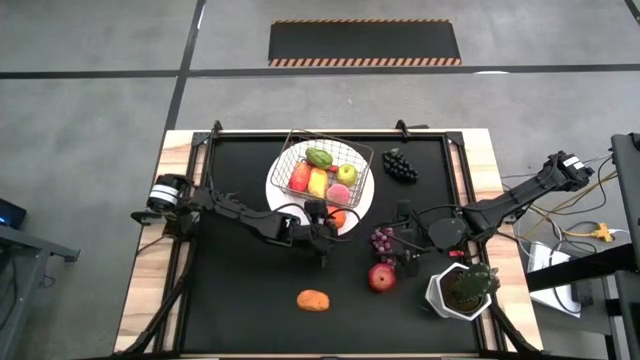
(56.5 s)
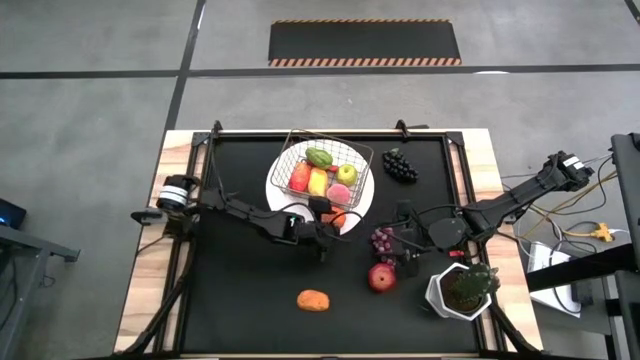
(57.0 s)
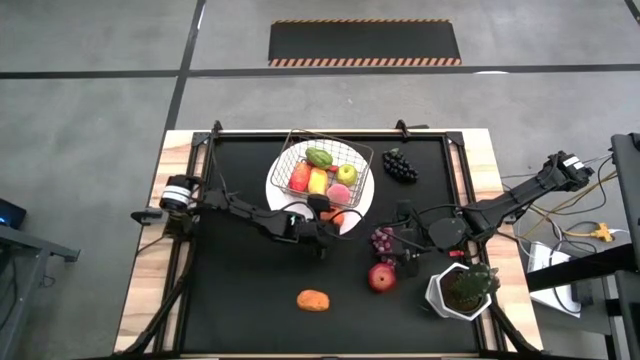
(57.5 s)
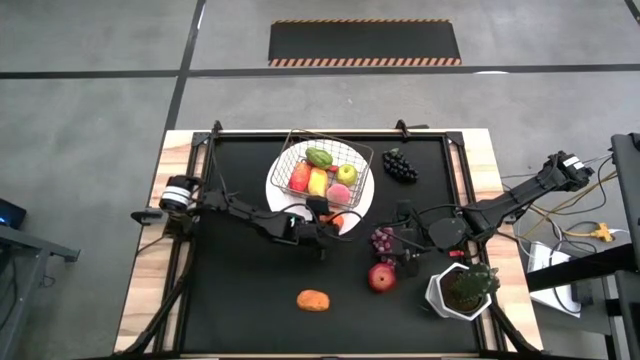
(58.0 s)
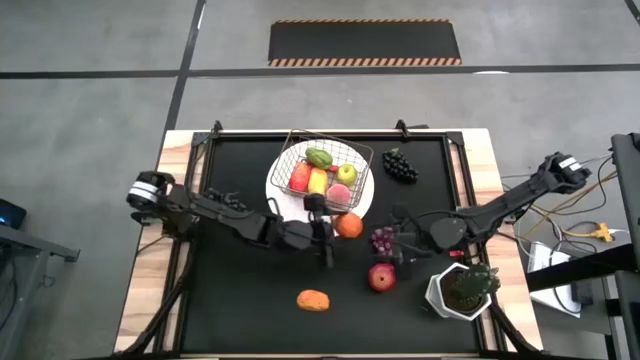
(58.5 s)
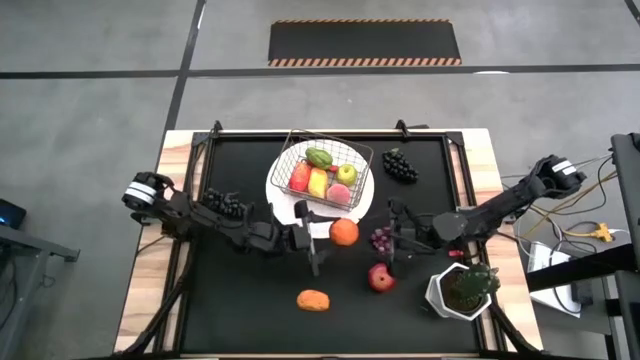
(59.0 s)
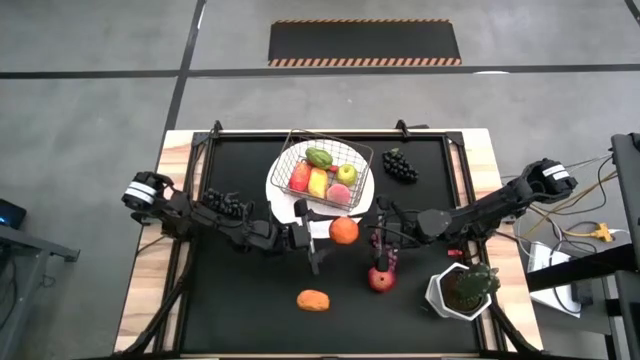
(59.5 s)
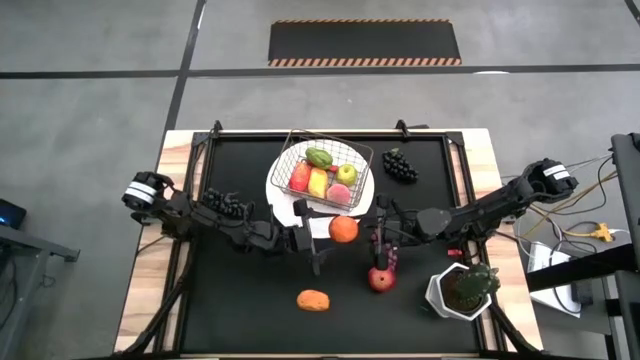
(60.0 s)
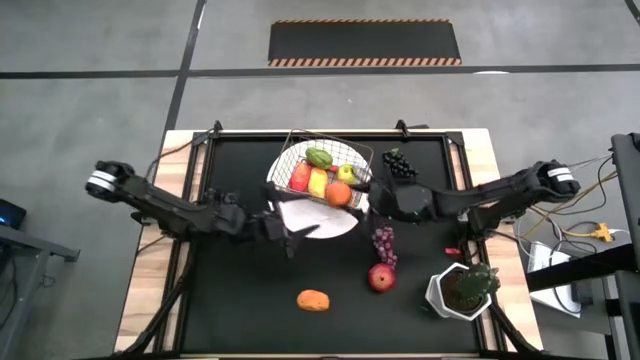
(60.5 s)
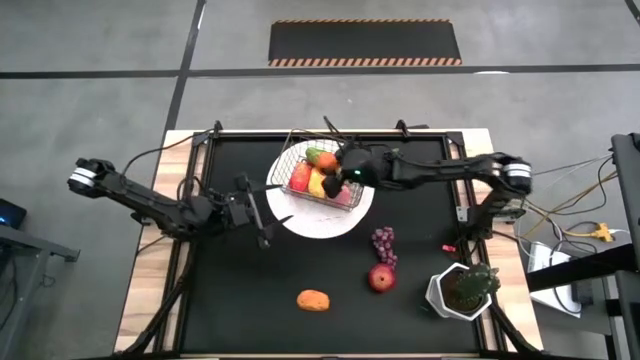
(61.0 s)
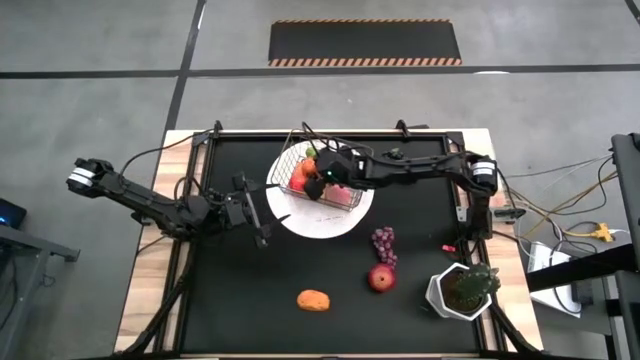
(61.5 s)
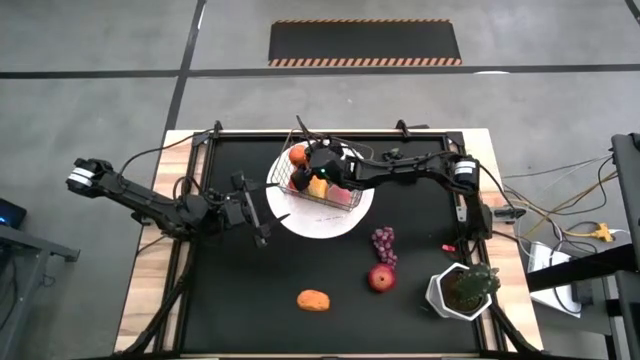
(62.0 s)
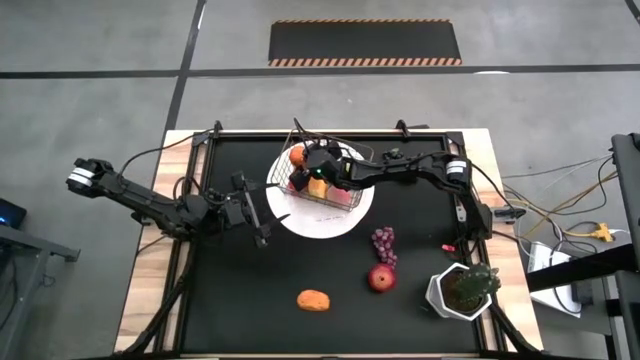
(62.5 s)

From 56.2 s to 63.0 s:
Task: Build produce basket
Put the orange into the silver basket

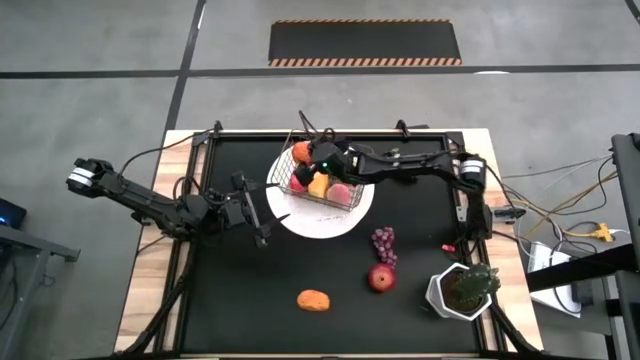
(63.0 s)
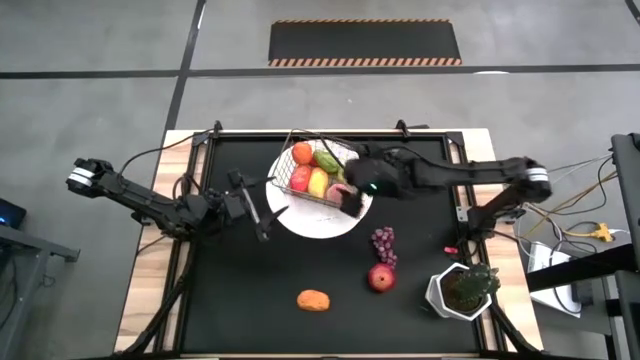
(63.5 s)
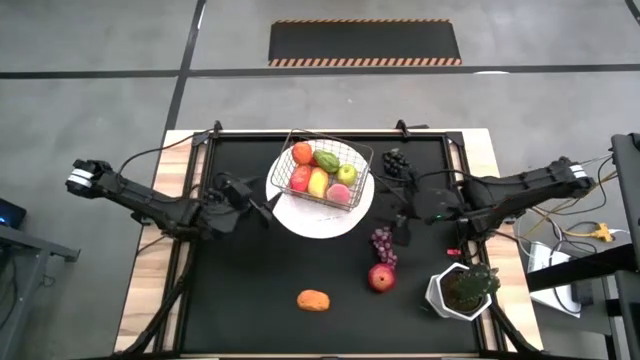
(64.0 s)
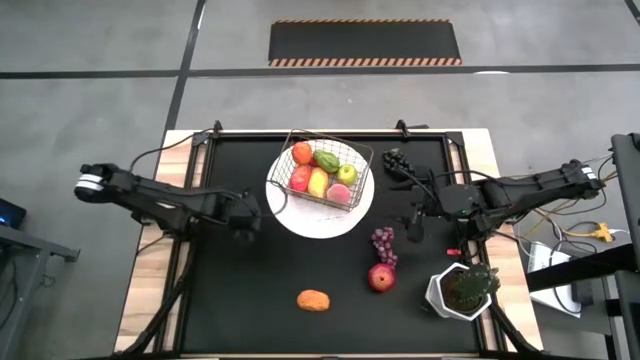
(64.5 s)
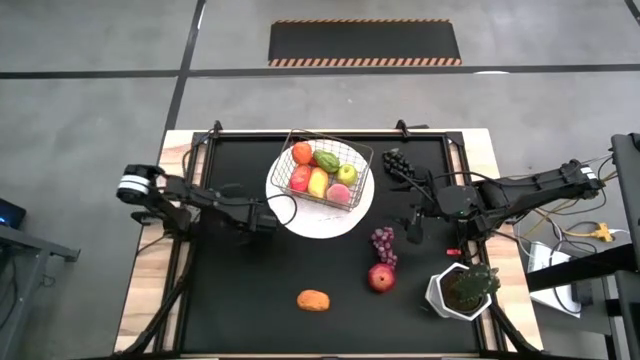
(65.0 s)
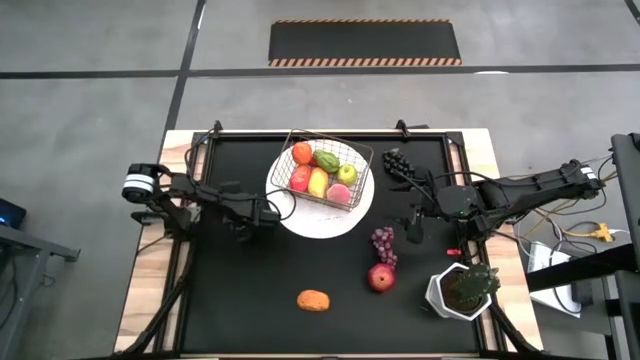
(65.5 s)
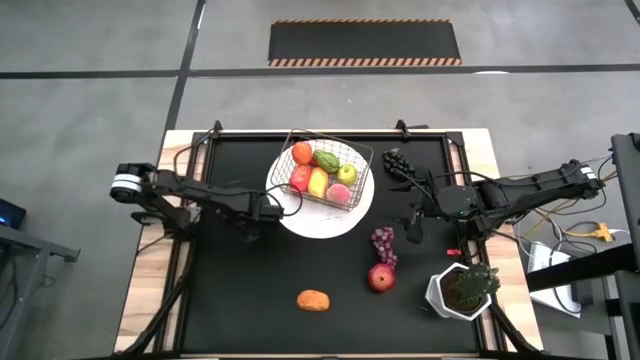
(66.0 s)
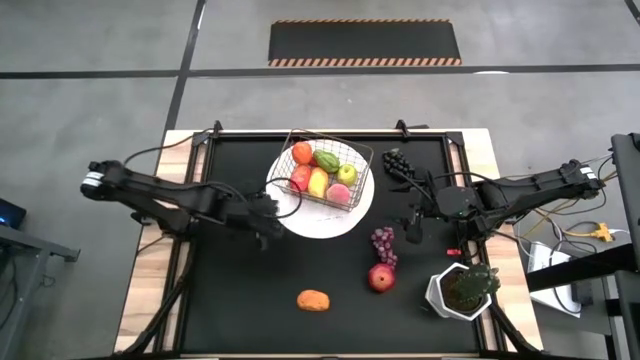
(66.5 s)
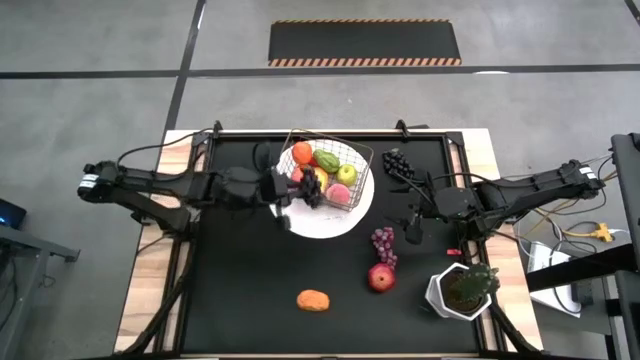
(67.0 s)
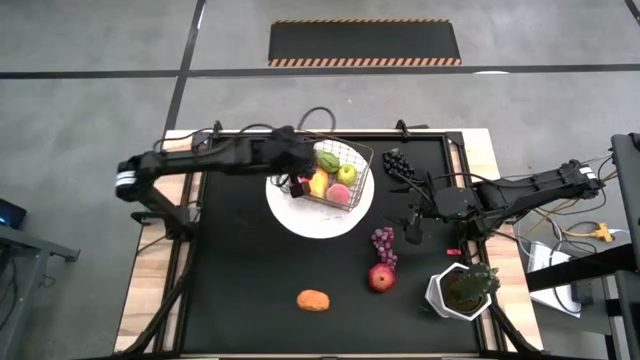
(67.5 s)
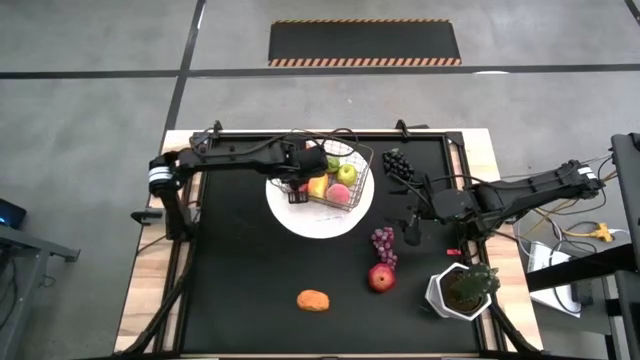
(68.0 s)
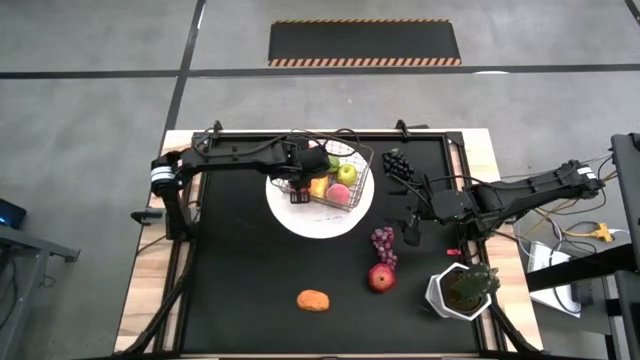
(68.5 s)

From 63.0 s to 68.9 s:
Put the black grapes into the silver basket

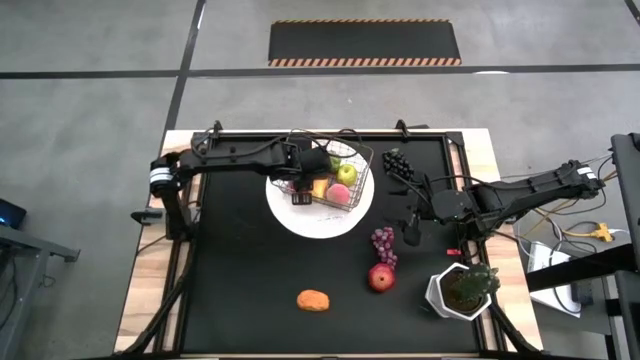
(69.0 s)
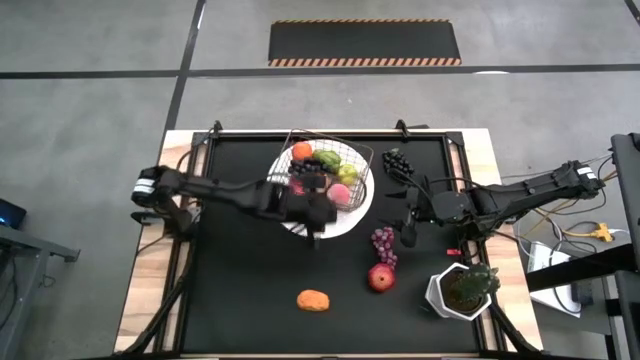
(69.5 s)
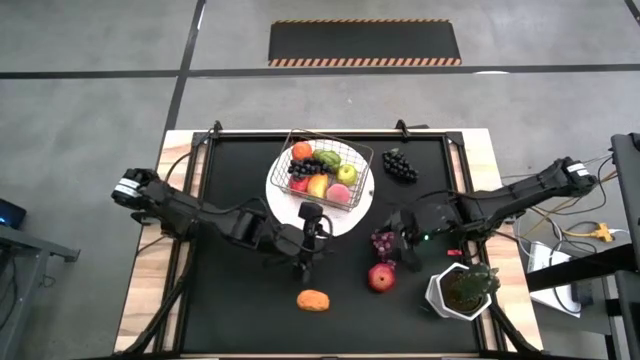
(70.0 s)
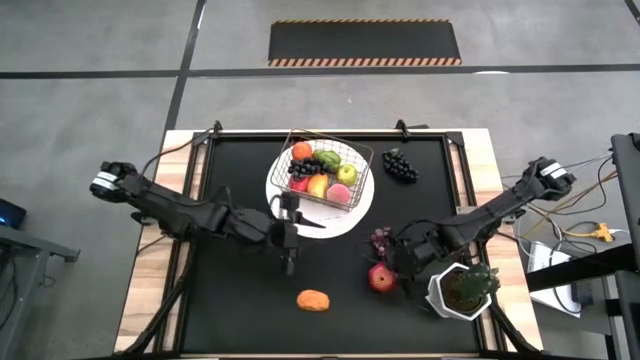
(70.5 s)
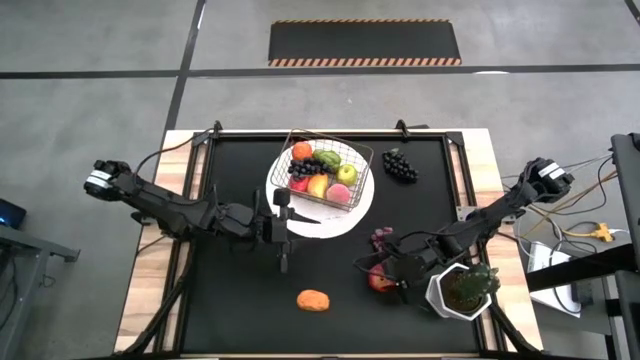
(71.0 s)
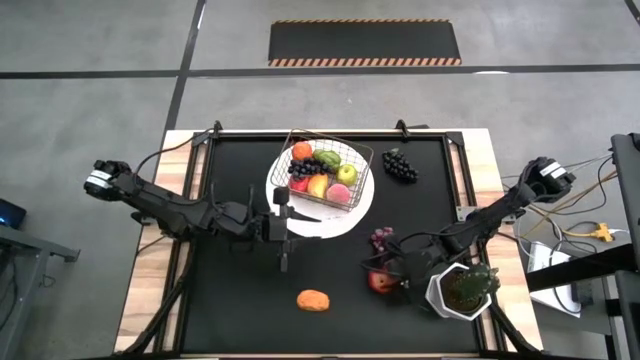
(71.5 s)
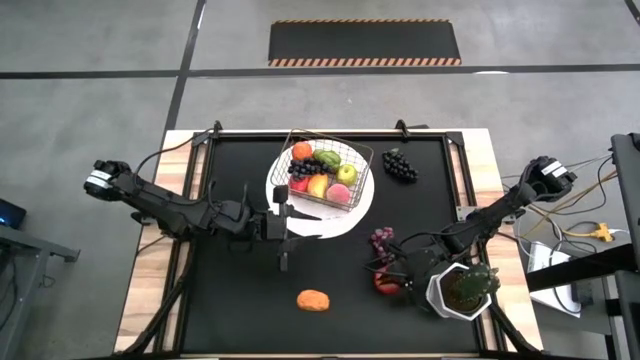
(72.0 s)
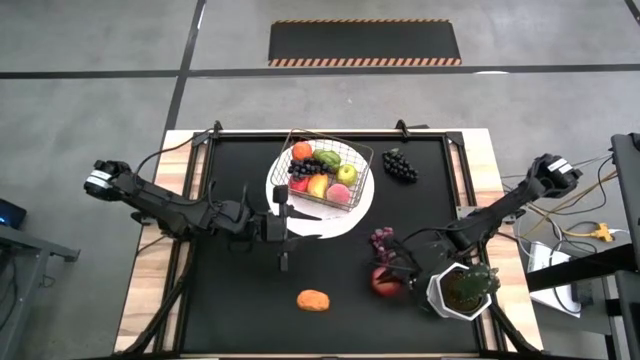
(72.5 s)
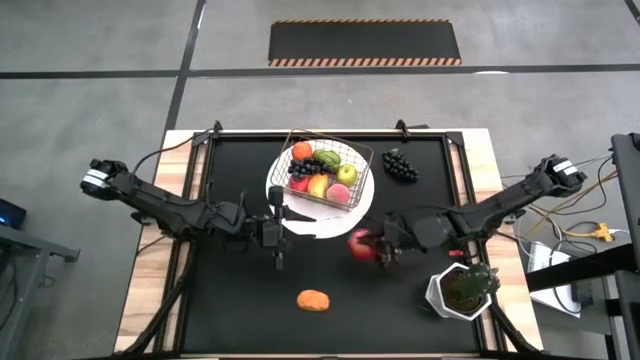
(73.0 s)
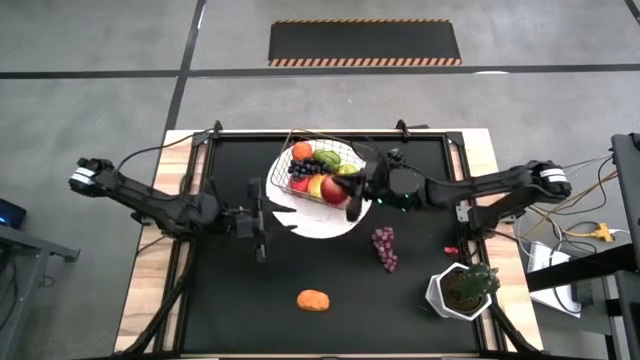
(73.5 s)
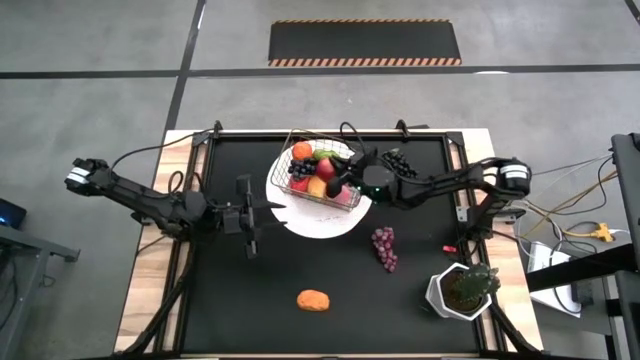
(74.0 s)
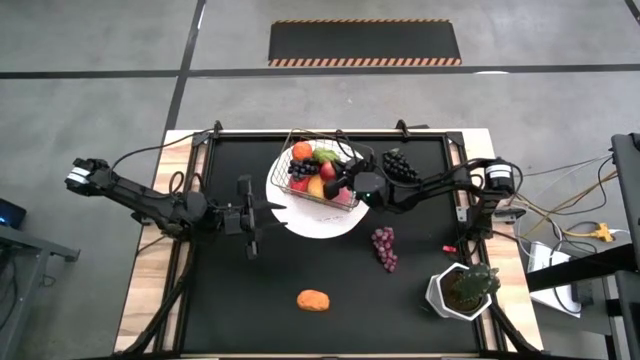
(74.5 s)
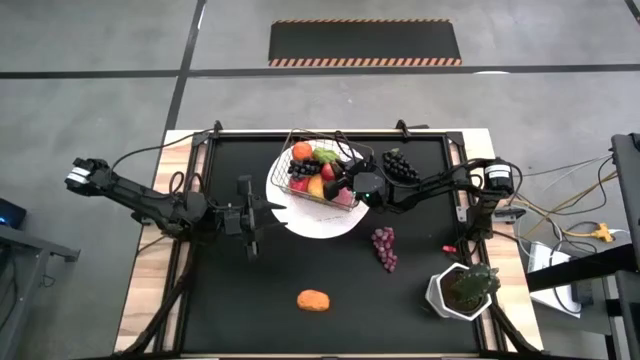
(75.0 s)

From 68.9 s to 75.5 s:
Put the pomegranate into the silver basket
